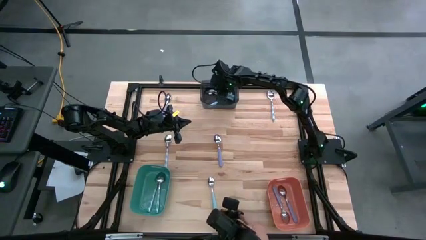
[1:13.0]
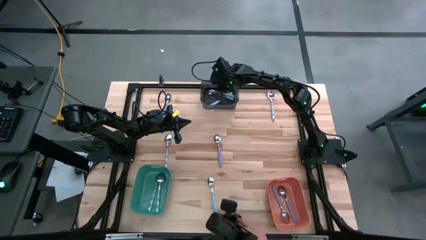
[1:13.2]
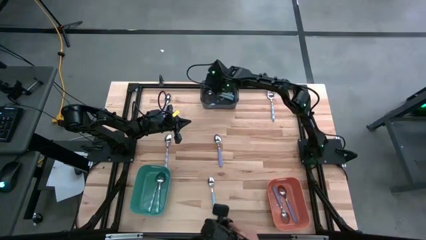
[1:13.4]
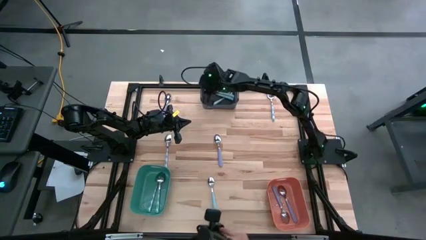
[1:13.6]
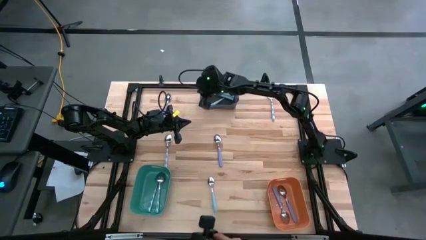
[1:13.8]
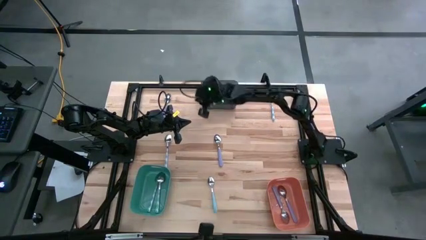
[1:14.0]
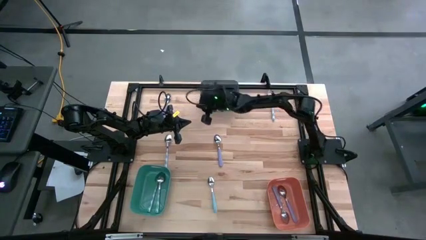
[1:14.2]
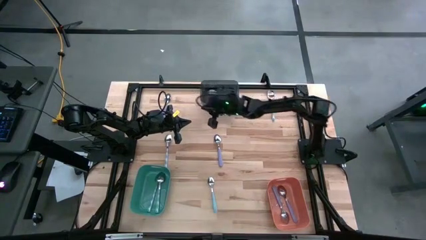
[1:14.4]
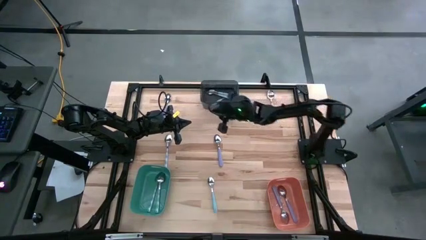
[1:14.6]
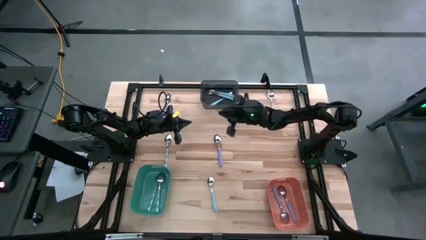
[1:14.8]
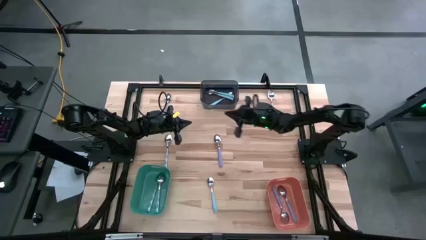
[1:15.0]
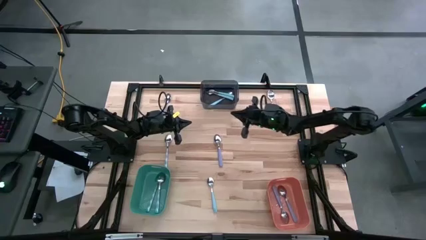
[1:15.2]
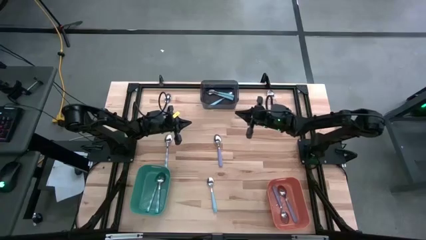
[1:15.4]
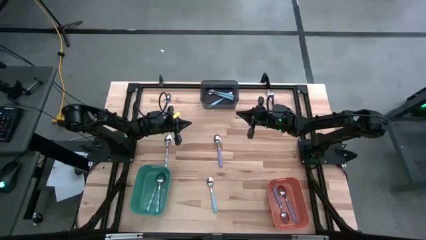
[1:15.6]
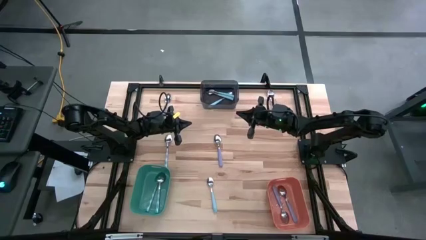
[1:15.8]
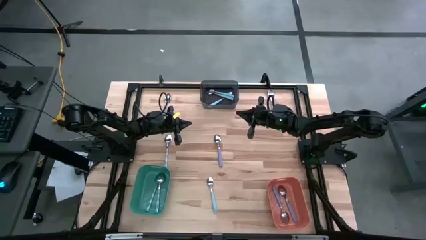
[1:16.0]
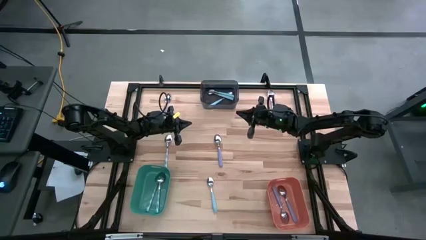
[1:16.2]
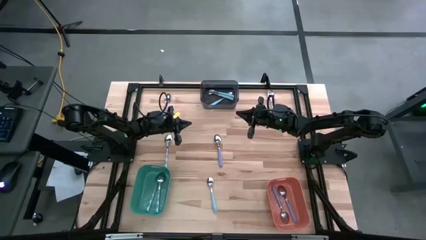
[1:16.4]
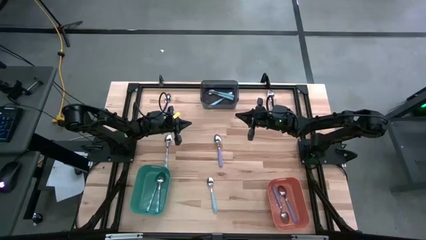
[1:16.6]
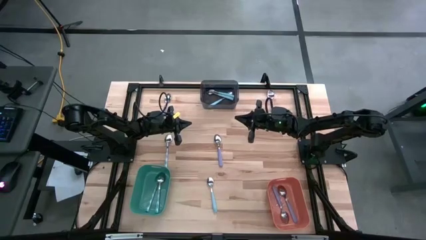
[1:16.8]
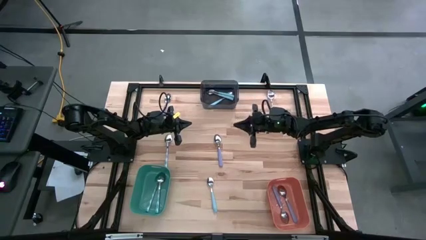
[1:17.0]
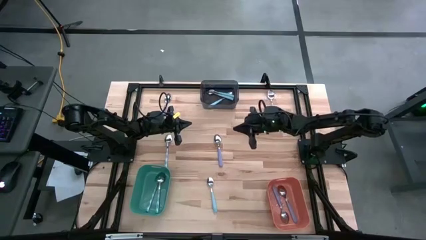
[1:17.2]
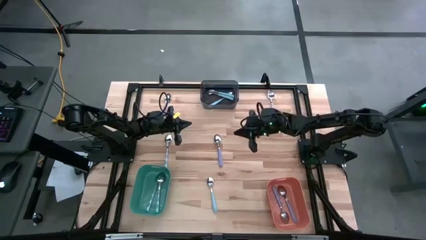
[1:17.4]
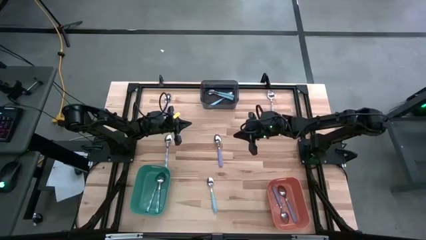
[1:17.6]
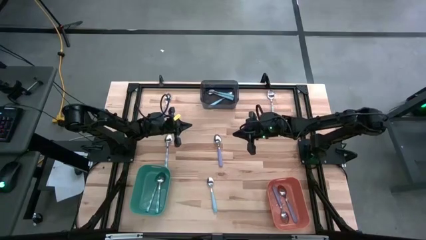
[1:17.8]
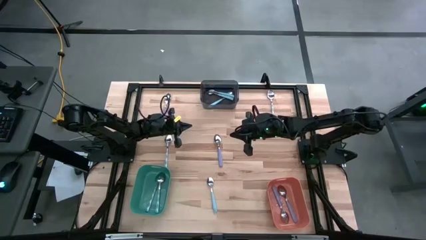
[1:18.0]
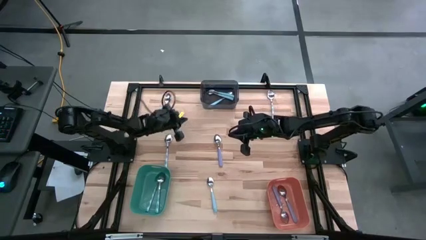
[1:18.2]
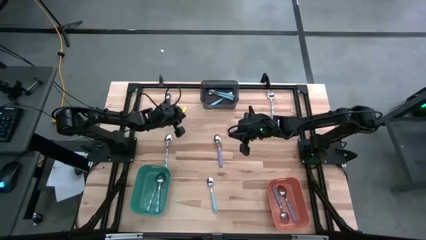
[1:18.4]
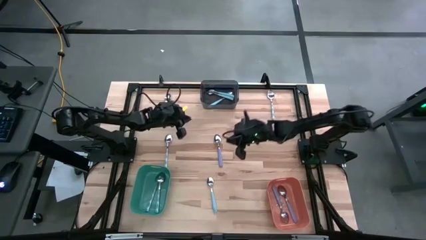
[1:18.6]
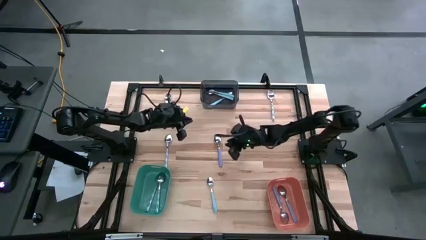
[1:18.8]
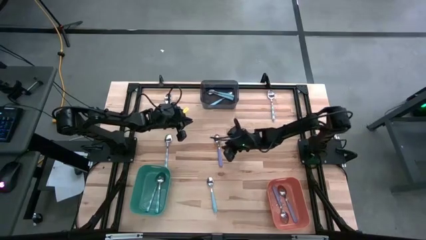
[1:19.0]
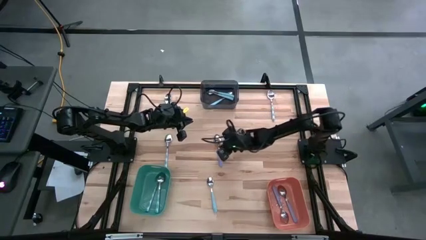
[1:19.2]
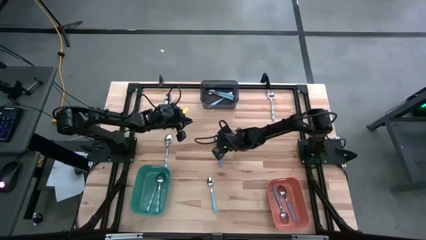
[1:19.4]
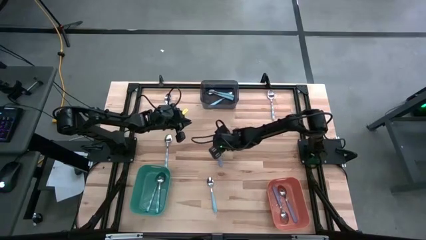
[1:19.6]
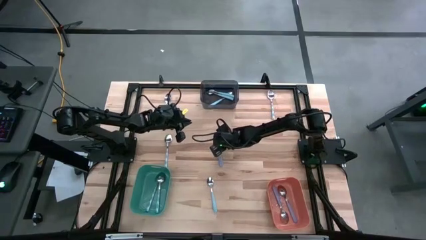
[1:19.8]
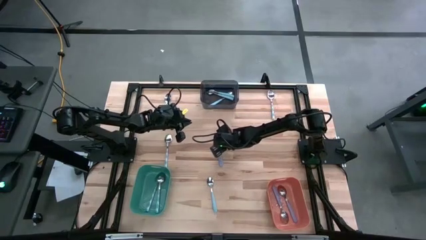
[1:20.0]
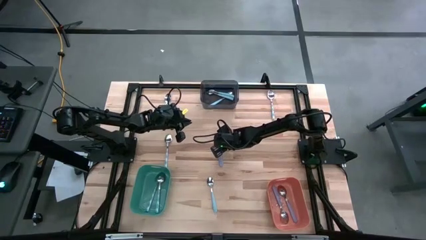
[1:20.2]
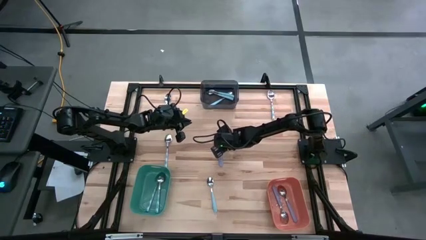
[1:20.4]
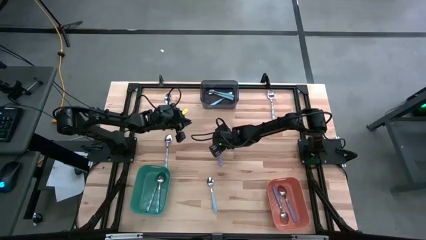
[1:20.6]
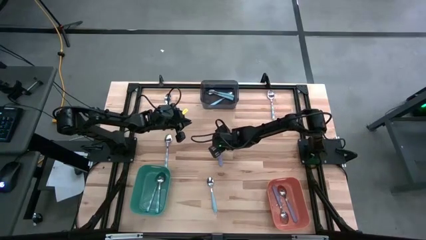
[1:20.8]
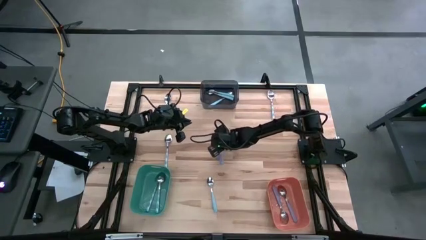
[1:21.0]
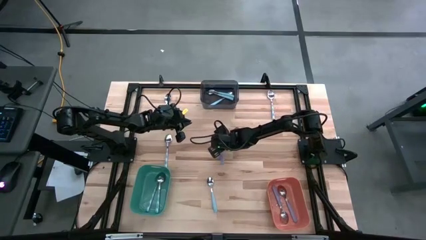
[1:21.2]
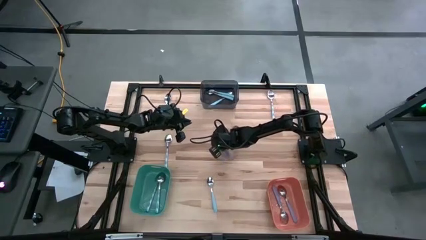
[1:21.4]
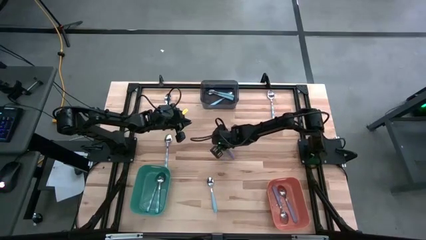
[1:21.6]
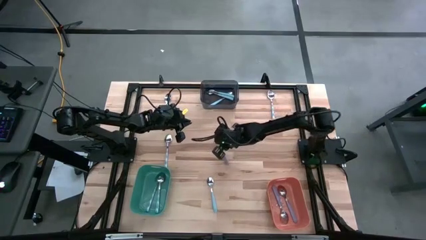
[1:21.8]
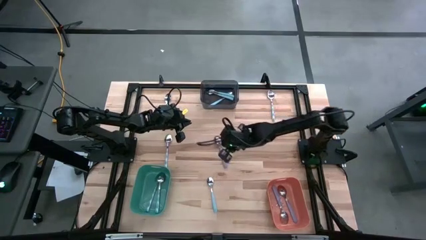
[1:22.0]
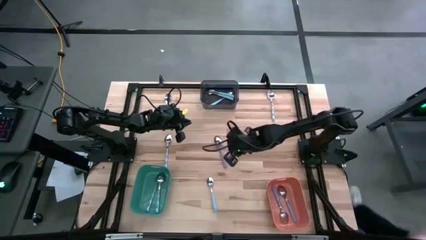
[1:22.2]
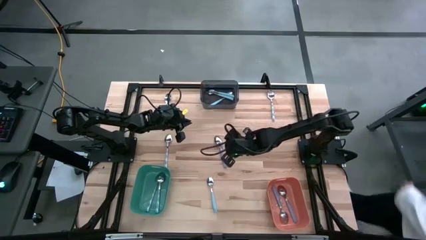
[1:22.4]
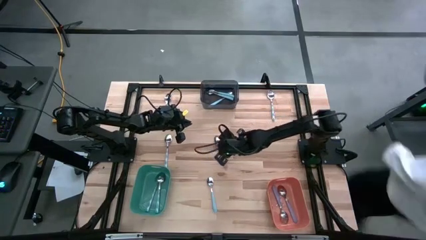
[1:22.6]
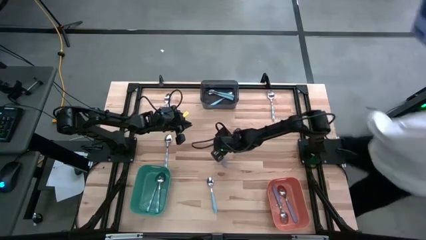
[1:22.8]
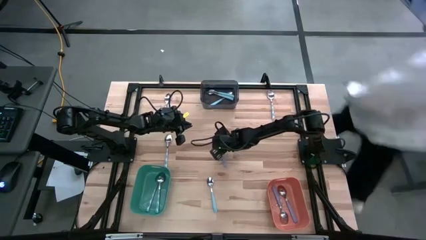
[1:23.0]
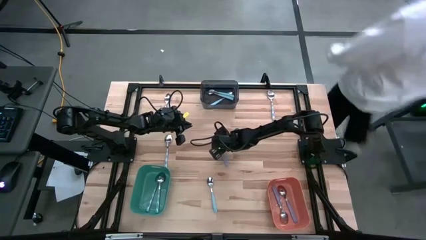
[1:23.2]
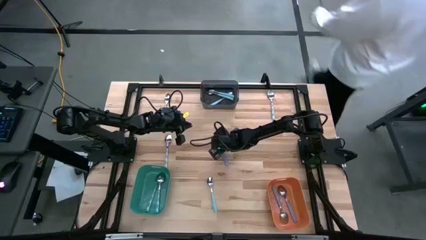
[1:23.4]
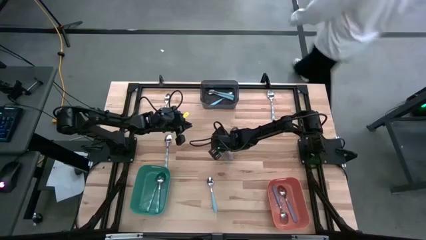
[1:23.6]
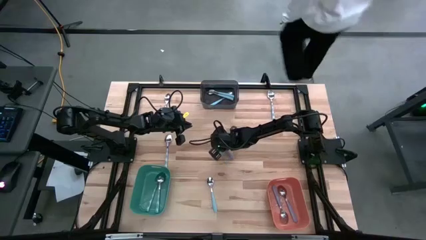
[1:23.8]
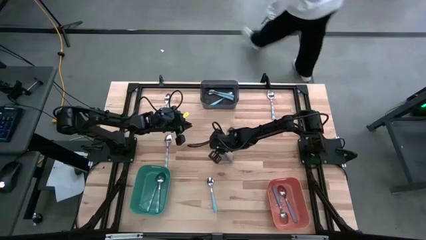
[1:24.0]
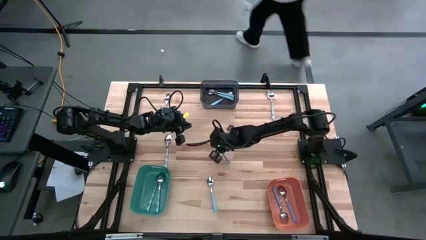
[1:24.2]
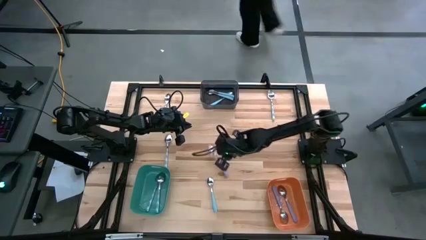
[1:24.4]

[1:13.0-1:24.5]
Task: Sort silverware by color (type)
Put the purple spoon into the orange bin

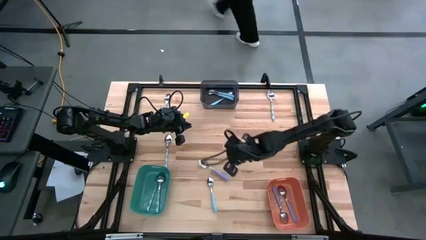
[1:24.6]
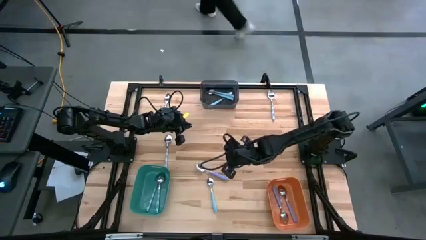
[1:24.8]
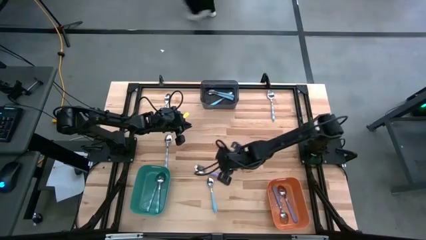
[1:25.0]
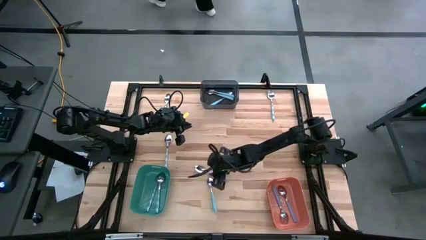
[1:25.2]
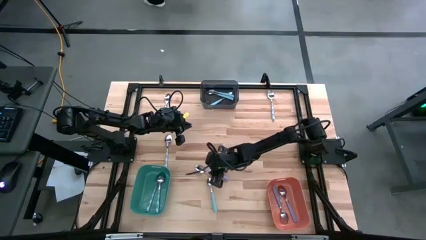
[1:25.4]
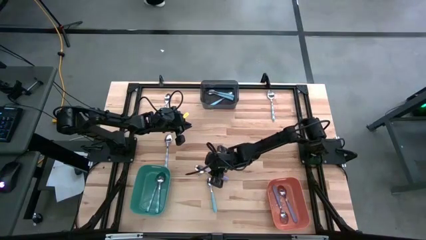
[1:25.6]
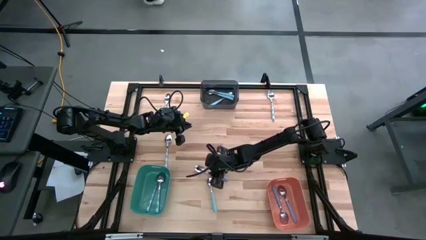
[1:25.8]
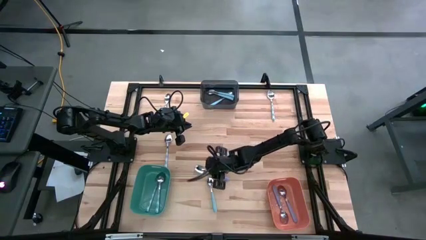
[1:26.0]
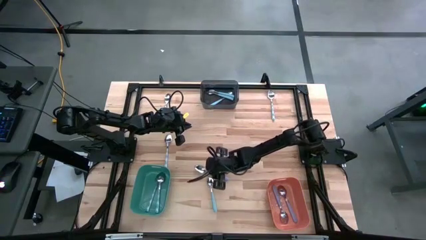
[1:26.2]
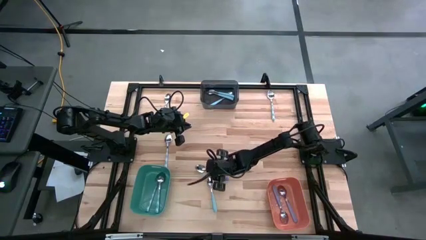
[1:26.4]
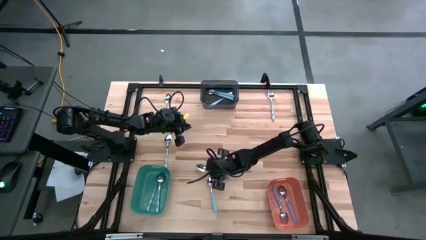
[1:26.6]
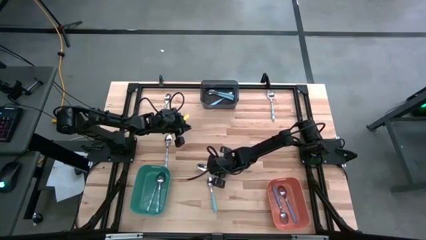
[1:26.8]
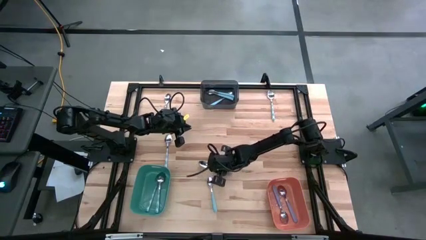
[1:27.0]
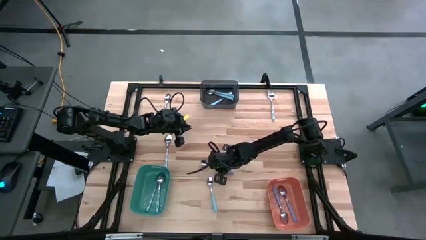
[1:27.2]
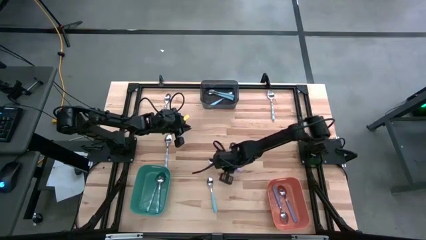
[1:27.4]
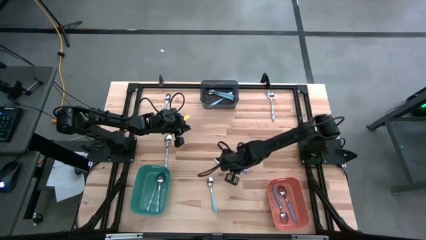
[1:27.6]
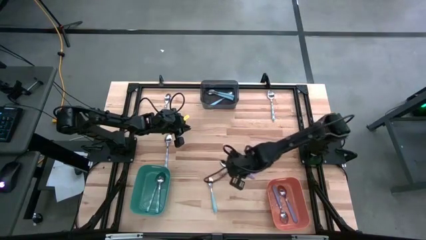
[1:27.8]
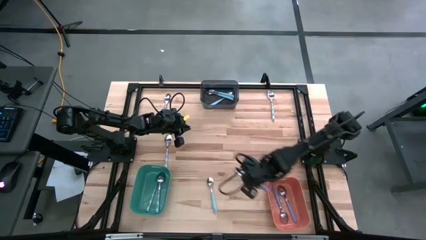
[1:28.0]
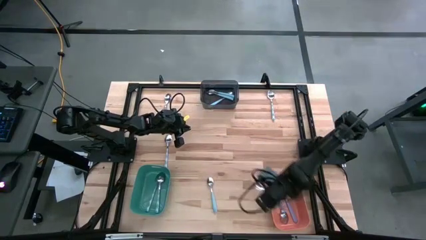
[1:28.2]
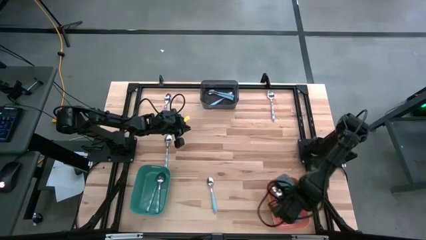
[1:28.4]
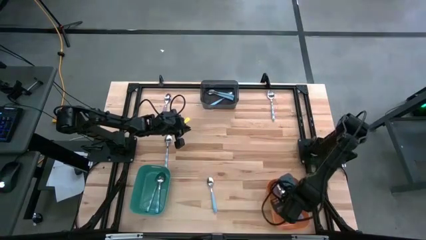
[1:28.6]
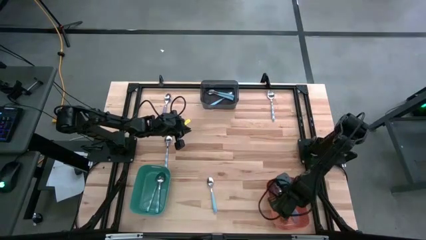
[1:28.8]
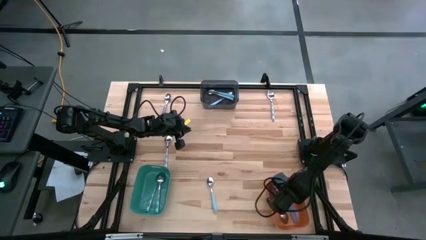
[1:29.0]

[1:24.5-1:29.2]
Put the purple spoon into the orange bin
